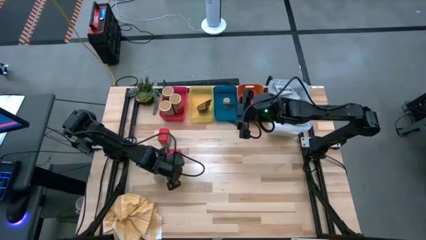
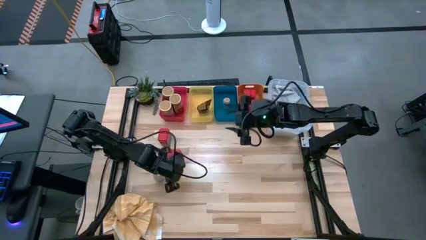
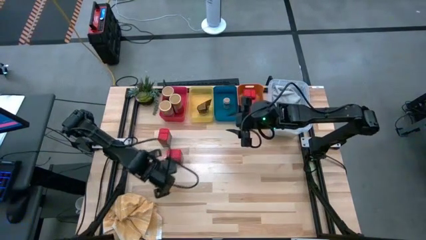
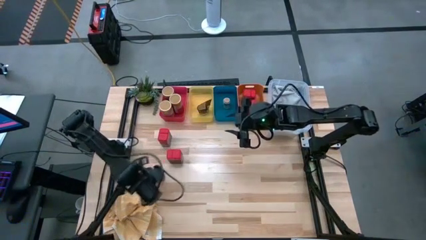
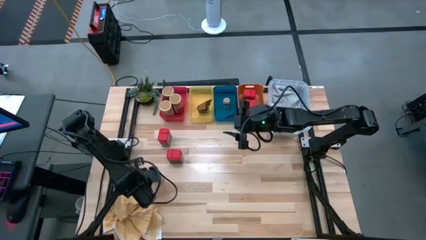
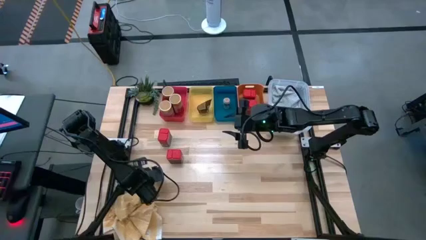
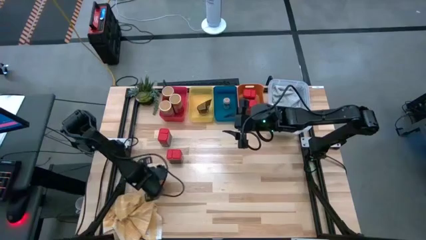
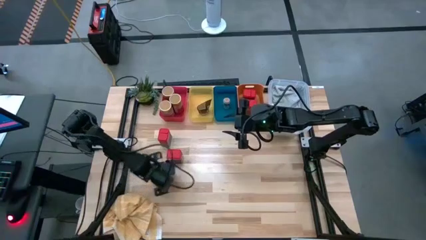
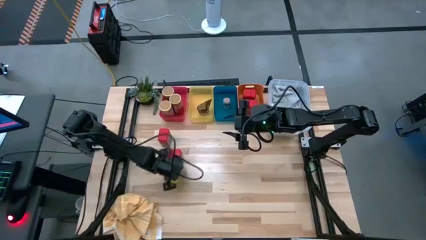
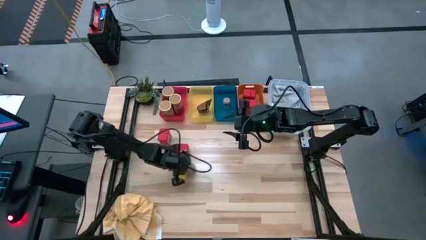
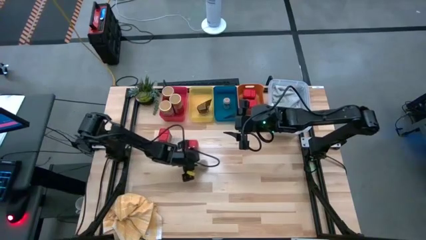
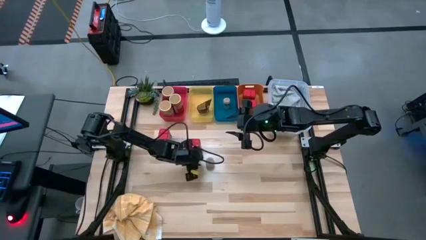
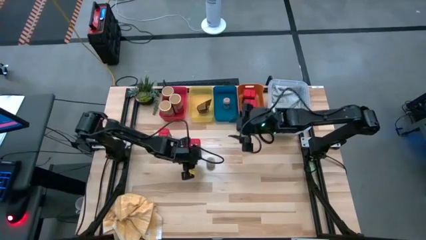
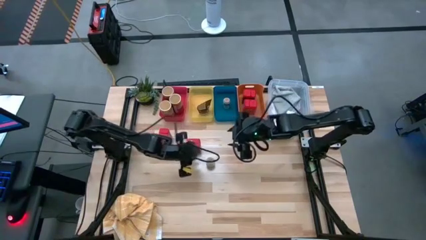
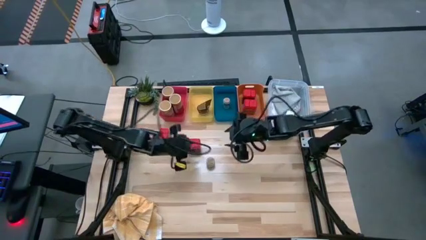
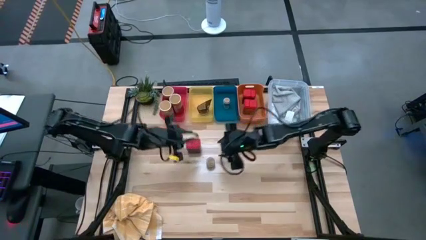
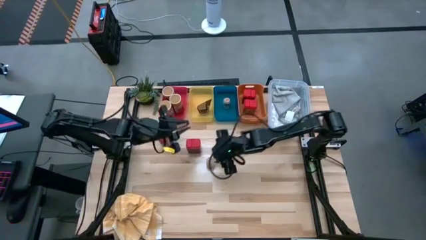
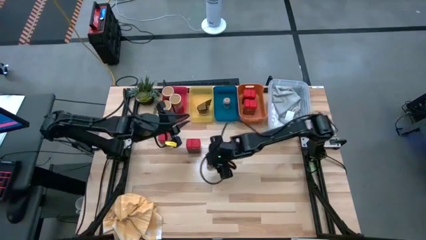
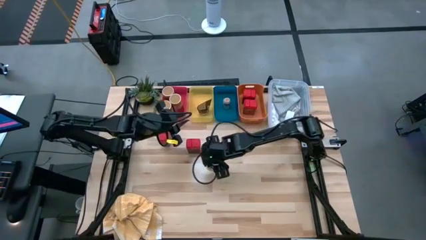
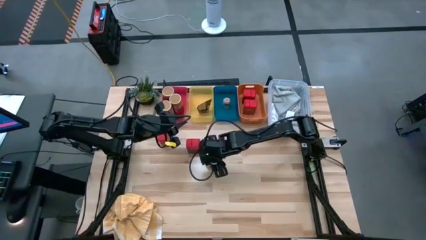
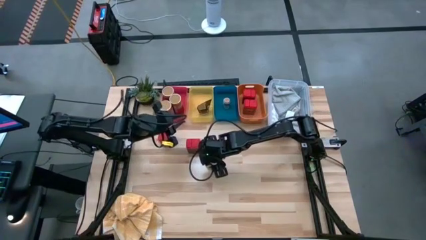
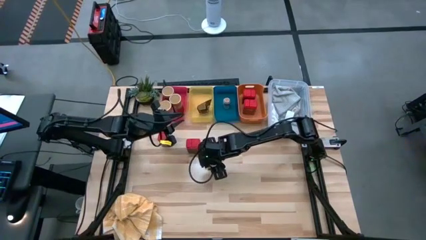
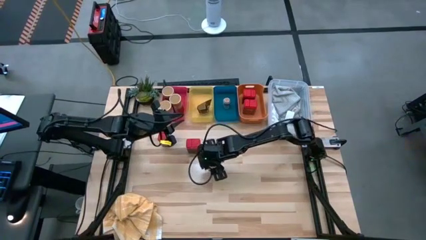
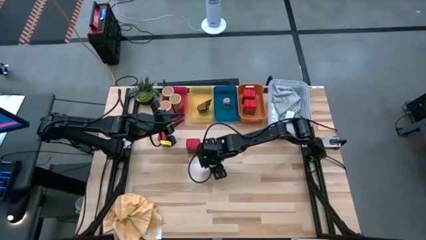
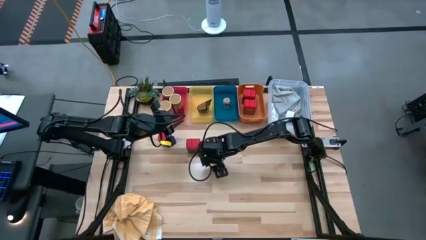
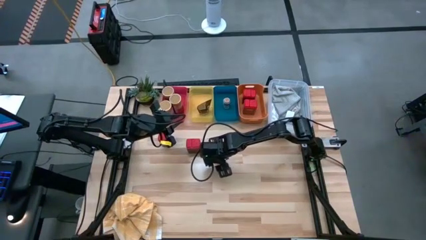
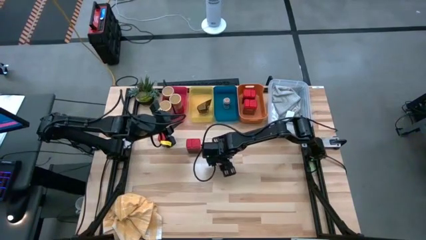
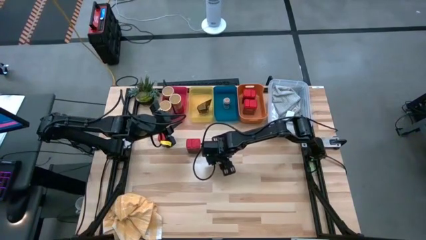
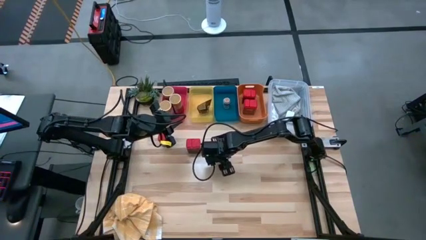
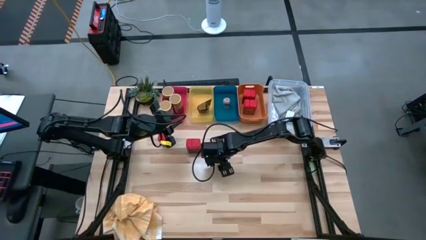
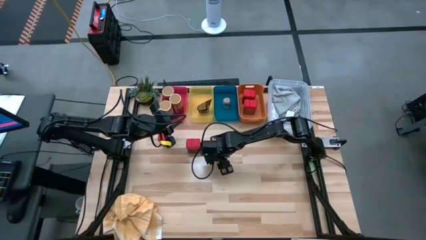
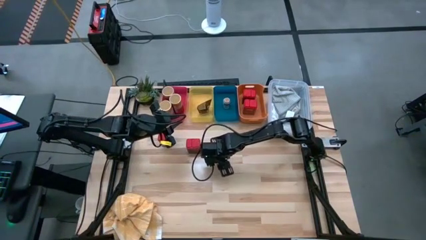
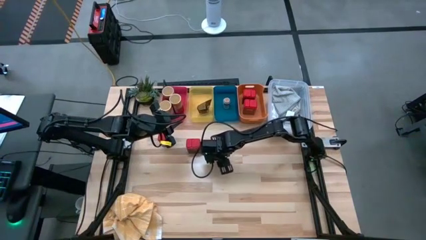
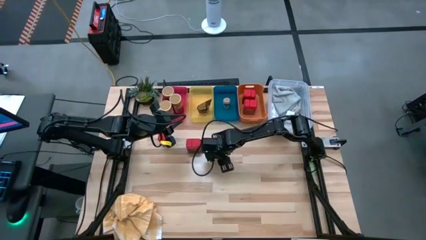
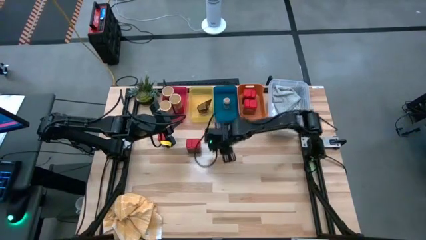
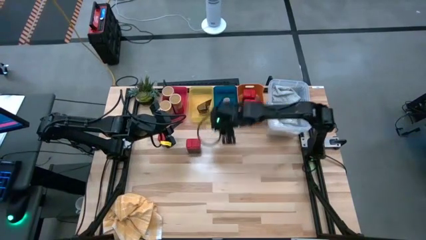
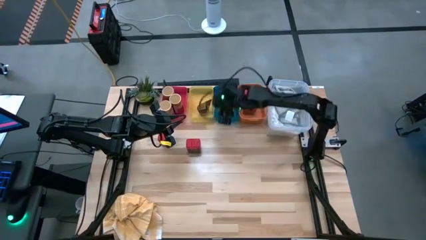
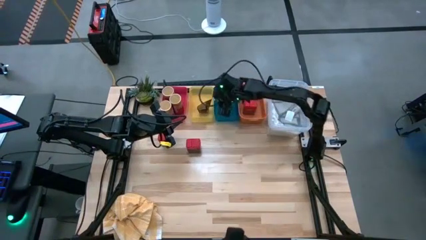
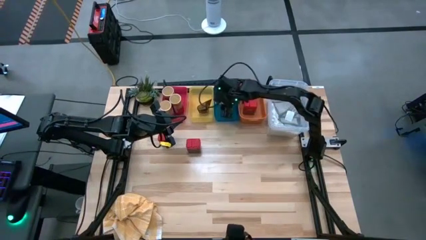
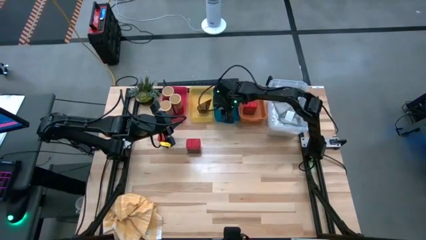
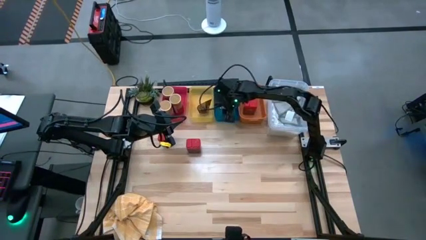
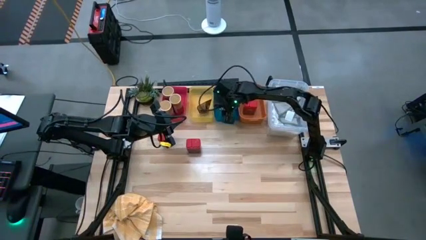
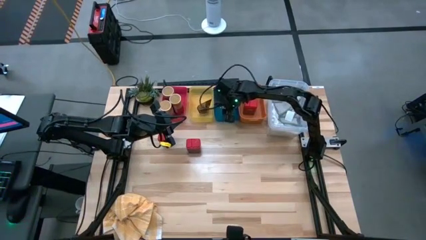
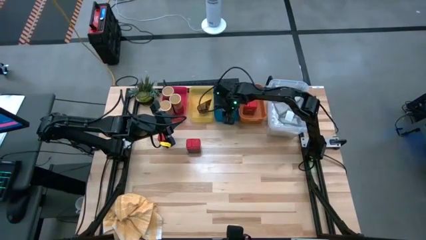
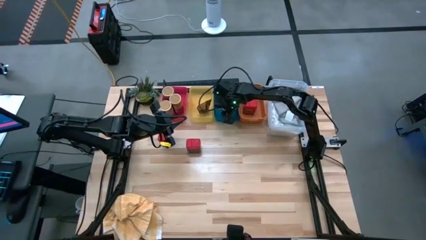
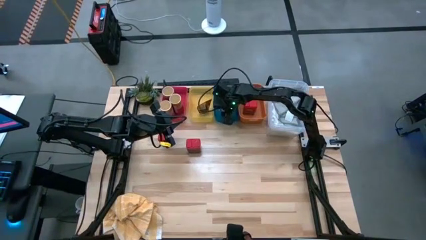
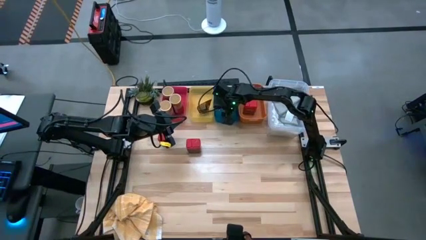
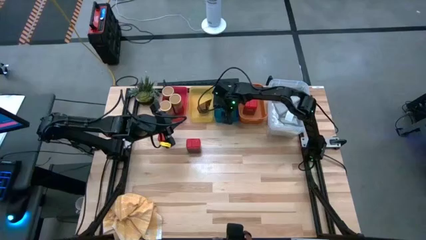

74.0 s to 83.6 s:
Task: Sort spices by type
Put the brown spice bottle into the blue bin

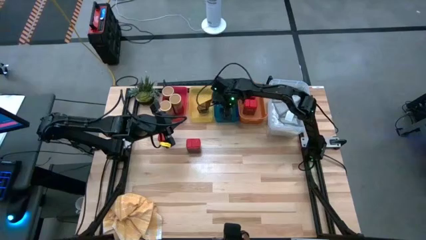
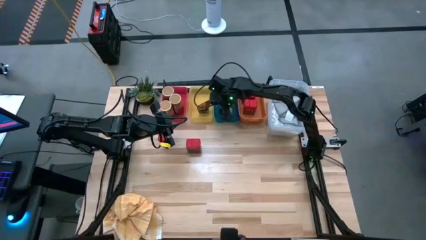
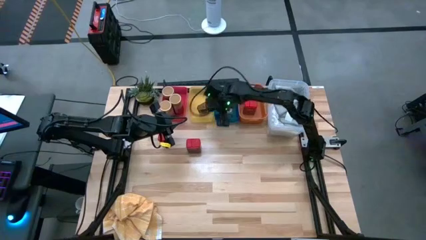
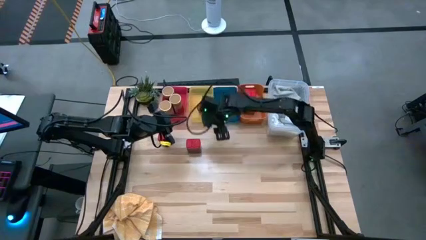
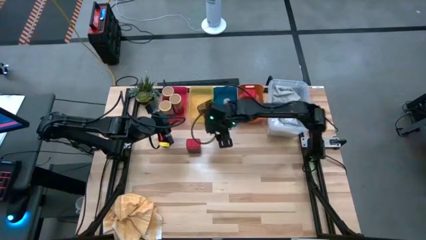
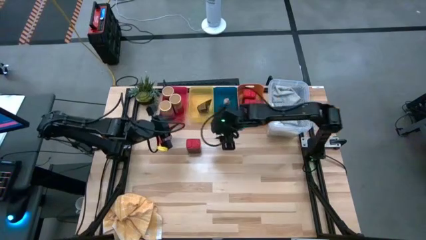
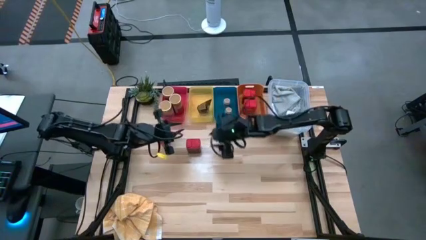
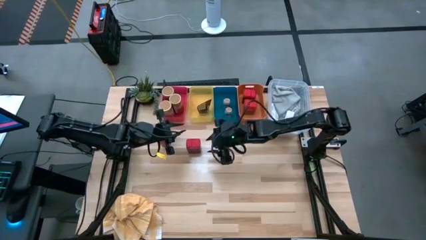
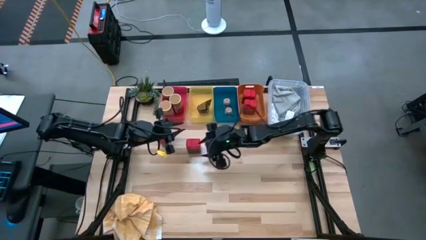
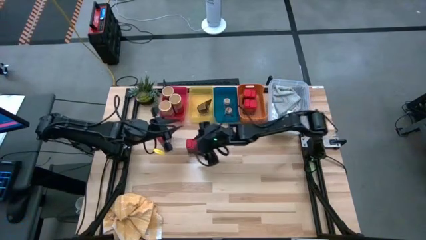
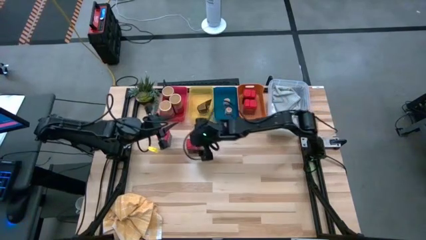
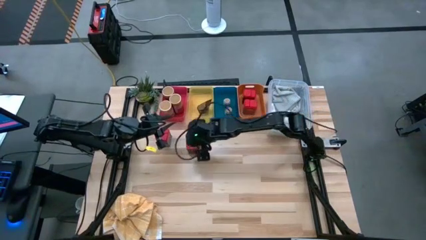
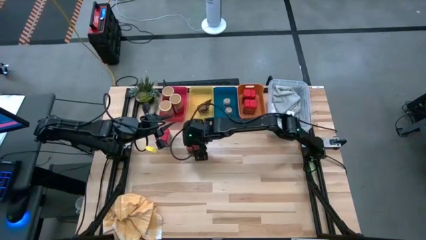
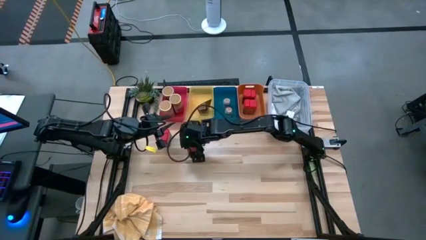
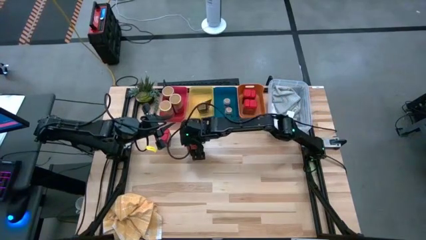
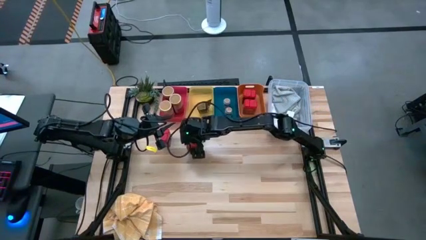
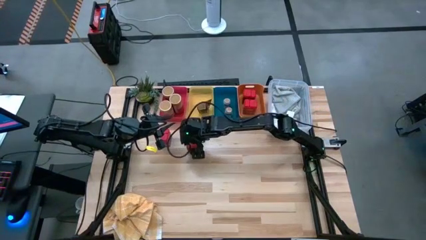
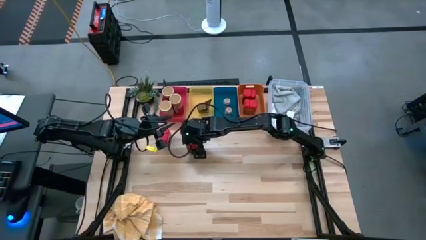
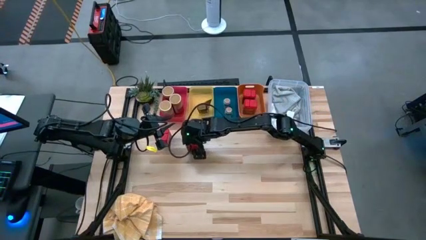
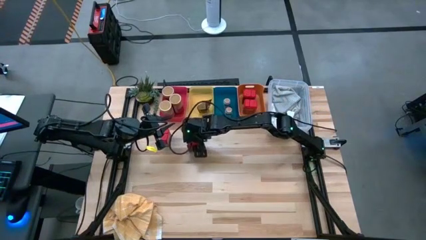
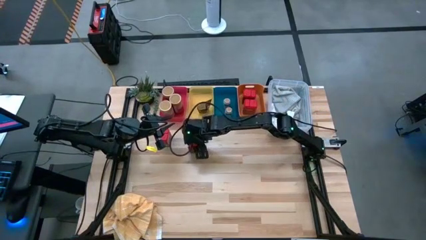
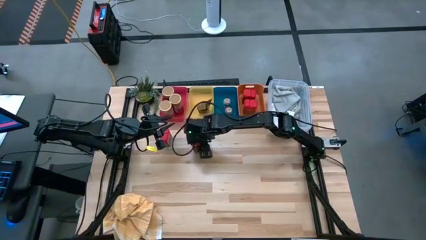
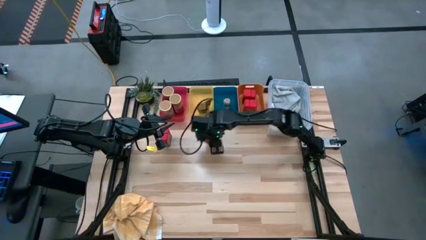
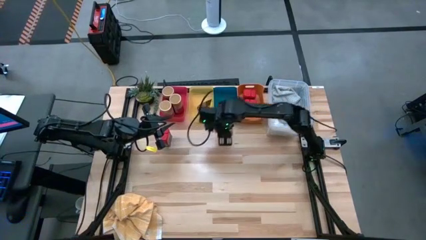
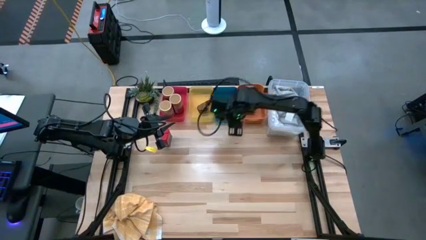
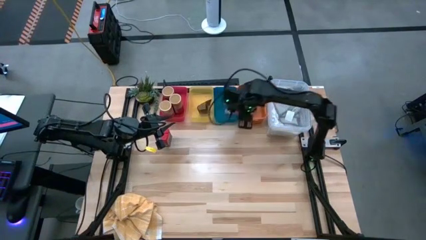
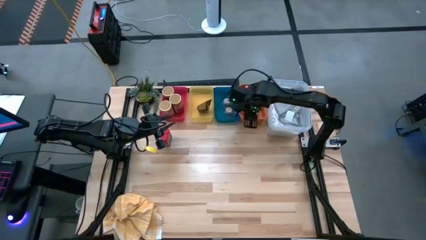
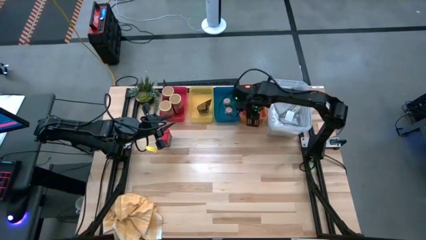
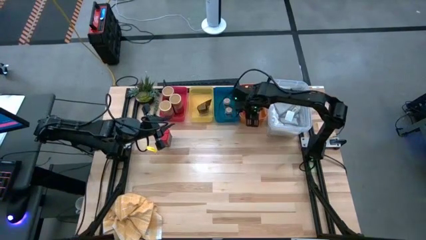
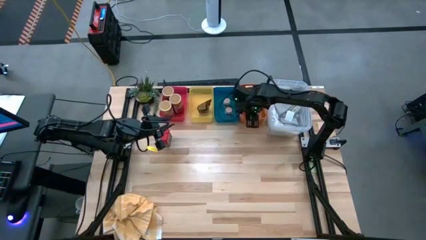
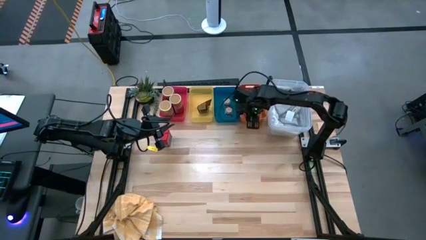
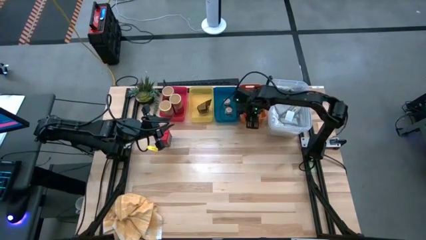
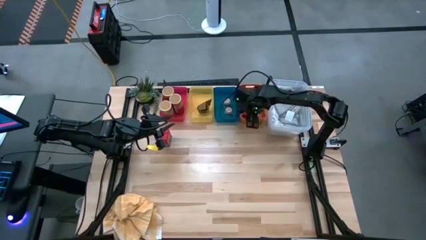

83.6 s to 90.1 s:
Put the red spice can into the orange bin
